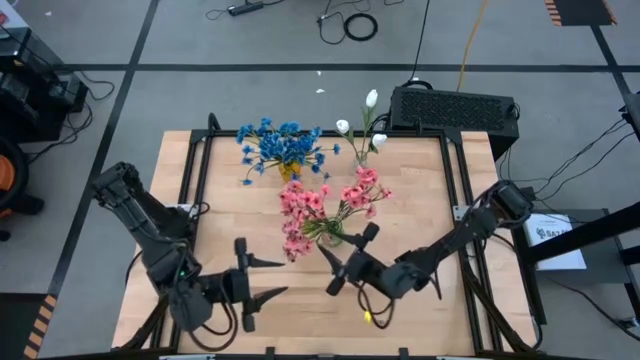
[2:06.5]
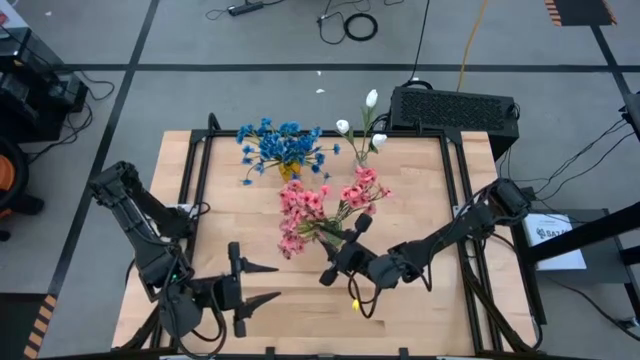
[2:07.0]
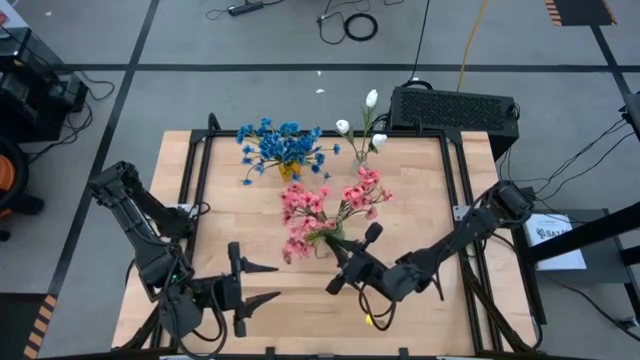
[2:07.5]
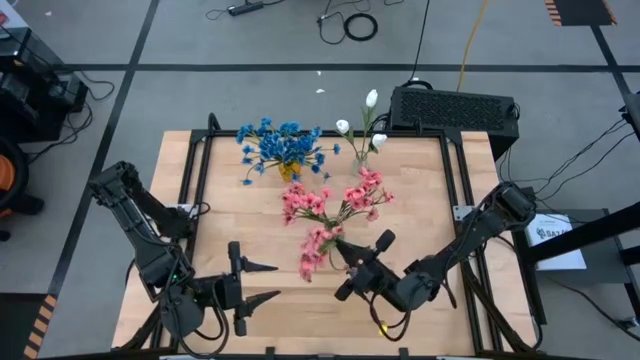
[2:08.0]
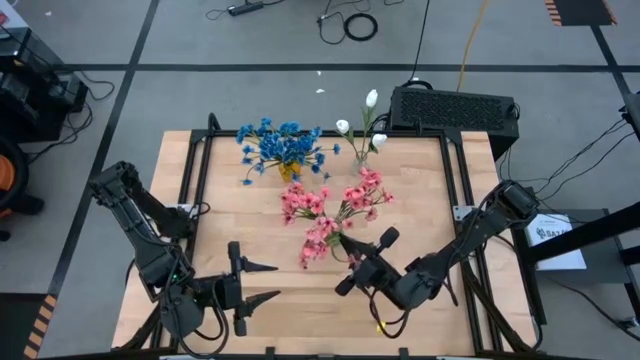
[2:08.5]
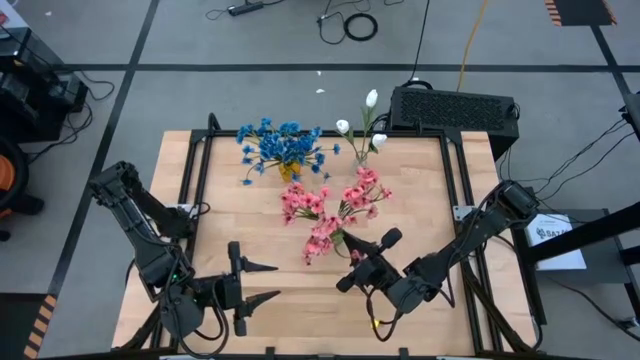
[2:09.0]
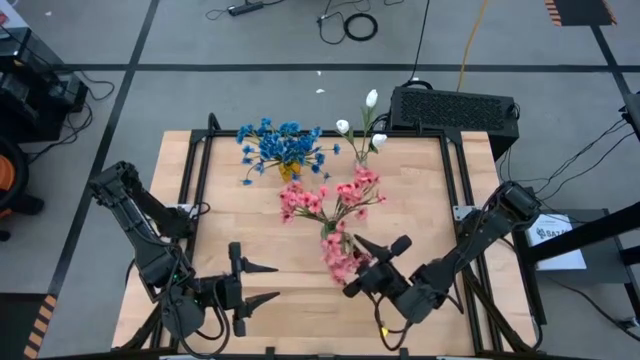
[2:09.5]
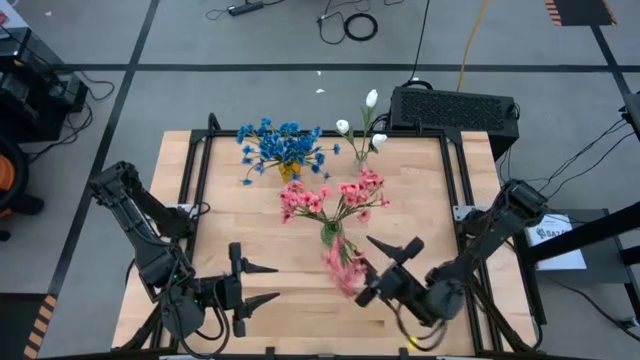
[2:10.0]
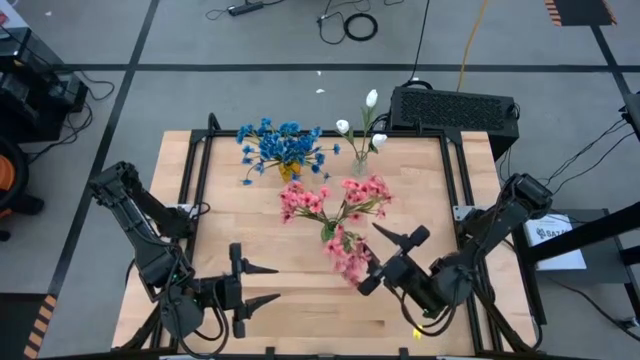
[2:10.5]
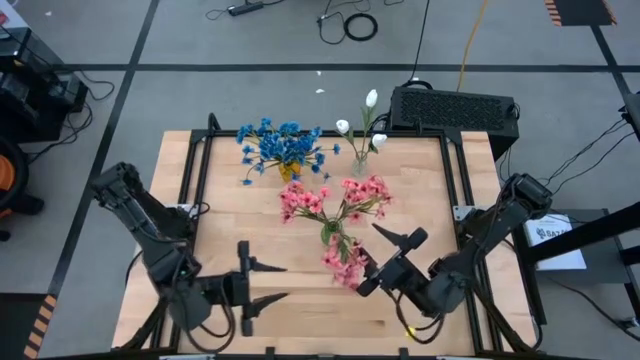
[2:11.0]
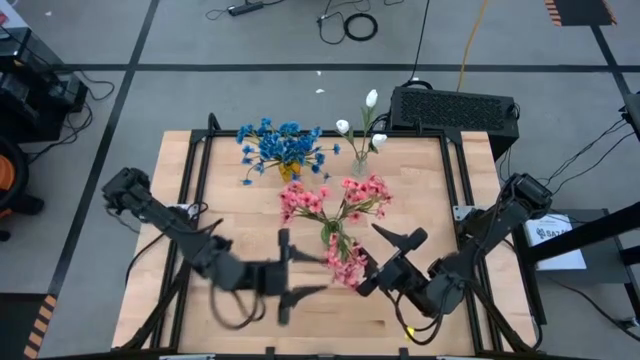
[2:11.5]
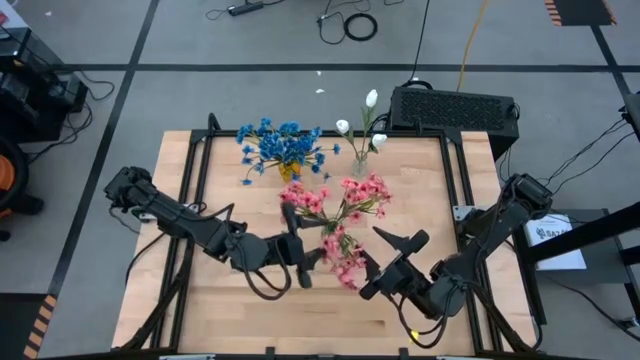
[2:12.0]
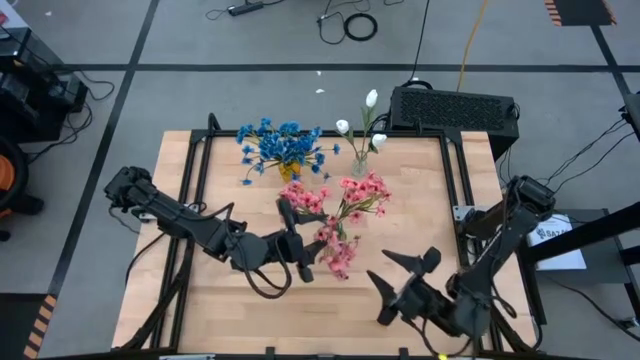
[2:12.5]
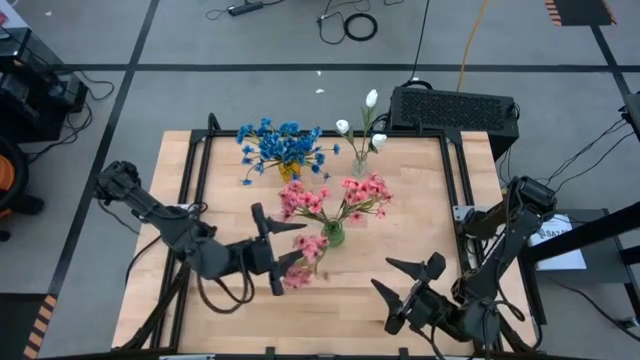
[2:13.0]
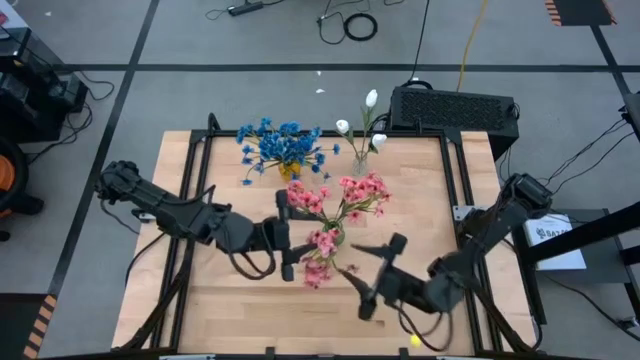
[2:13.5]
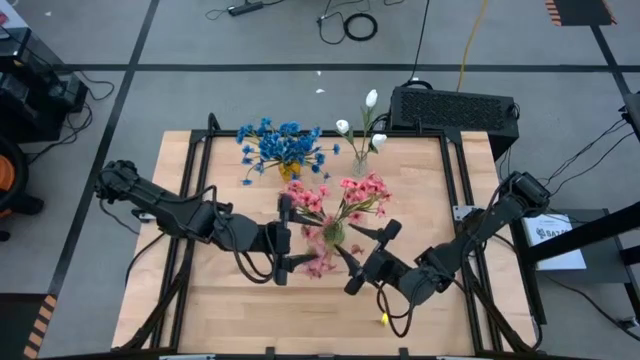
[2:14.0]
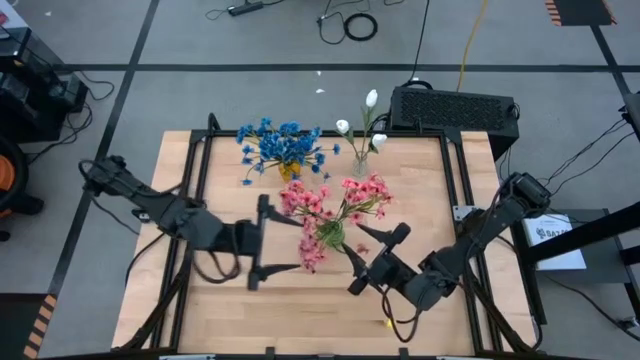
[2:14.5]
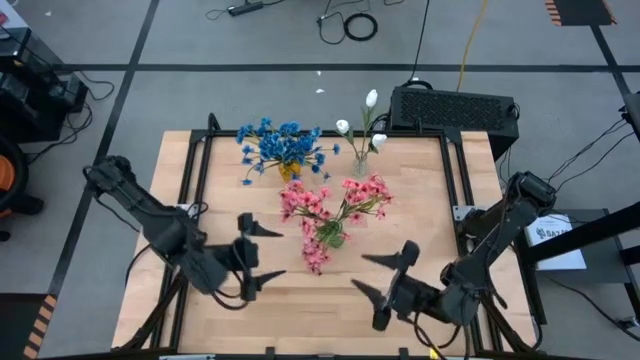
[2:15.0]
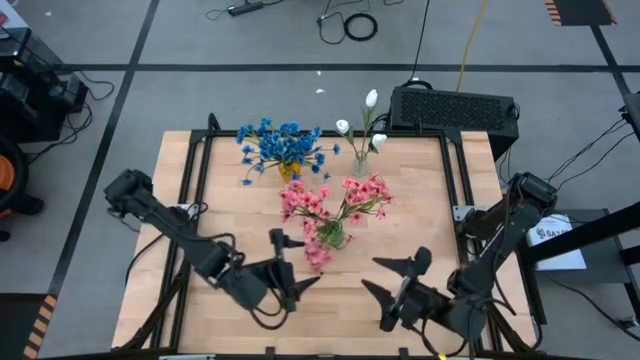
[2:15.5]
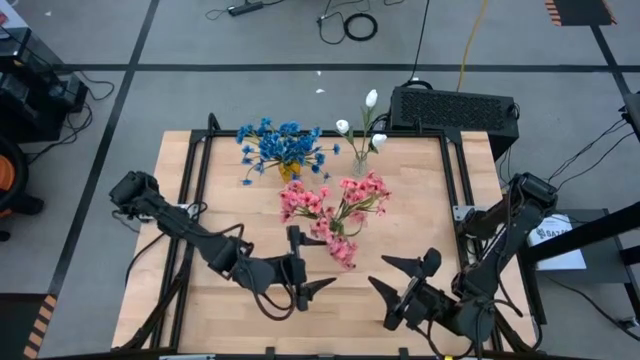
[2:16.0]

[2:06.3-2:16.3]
Task: Sort flowers into vase by color
Adjust the pink flowers in the green vase

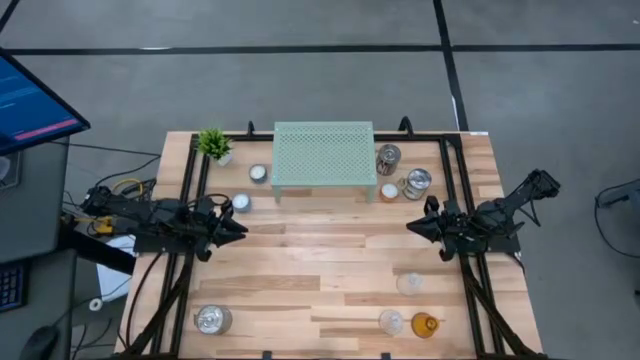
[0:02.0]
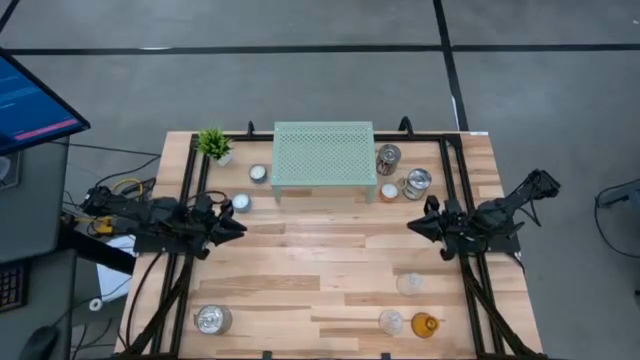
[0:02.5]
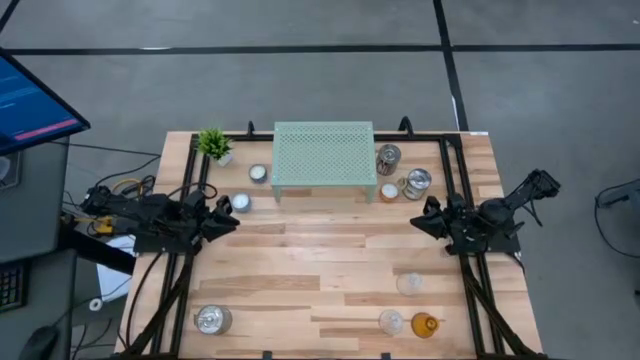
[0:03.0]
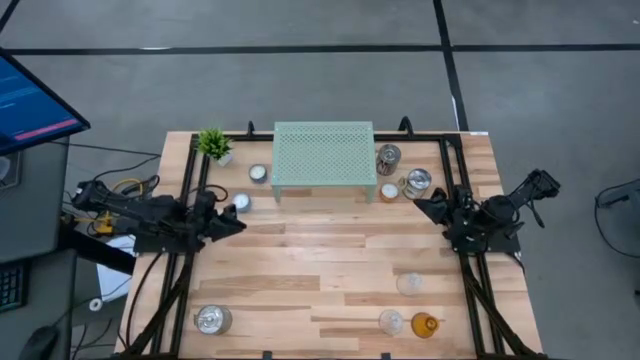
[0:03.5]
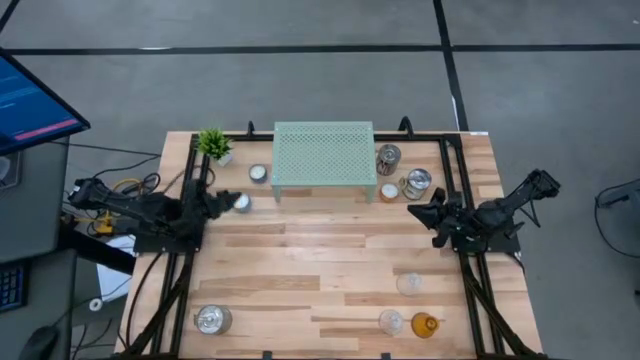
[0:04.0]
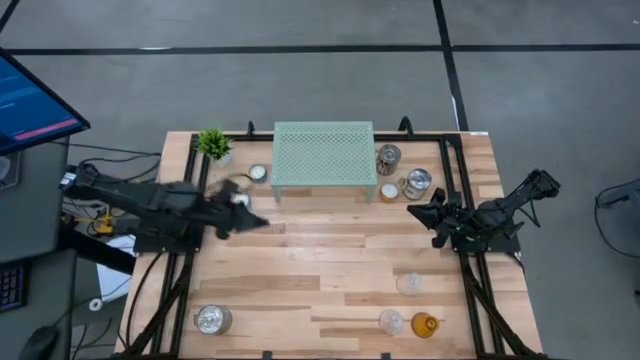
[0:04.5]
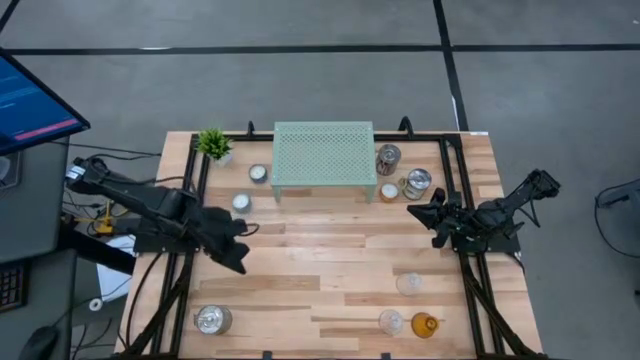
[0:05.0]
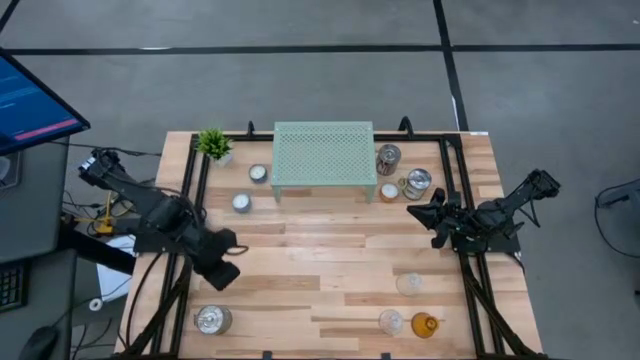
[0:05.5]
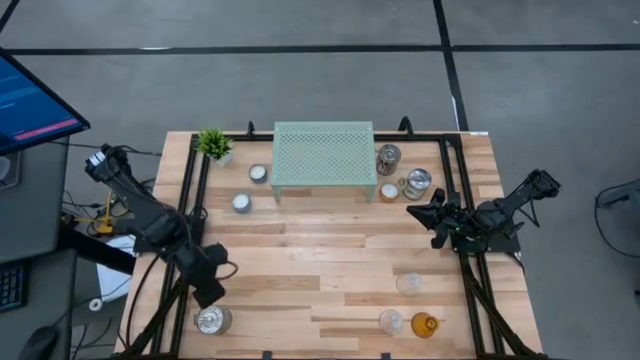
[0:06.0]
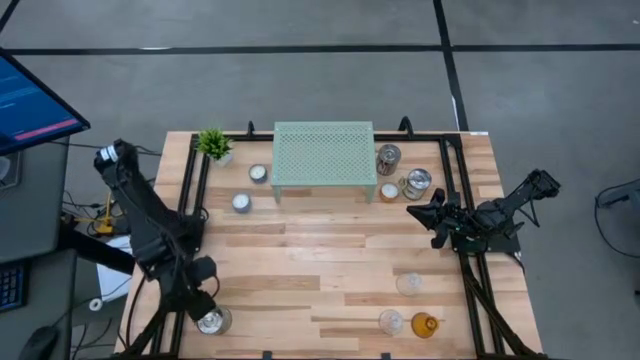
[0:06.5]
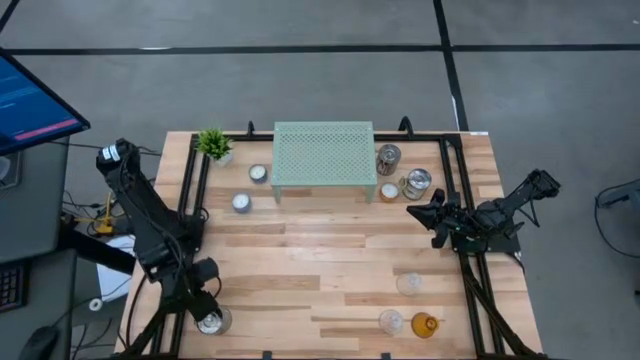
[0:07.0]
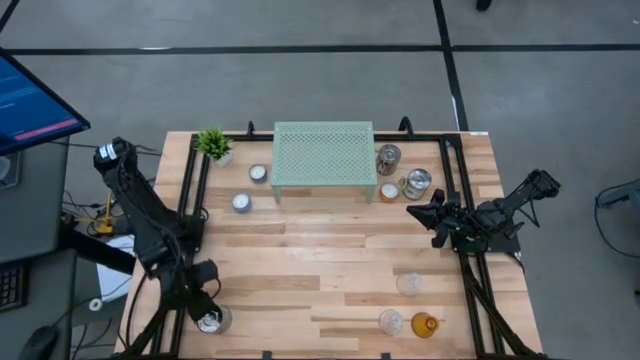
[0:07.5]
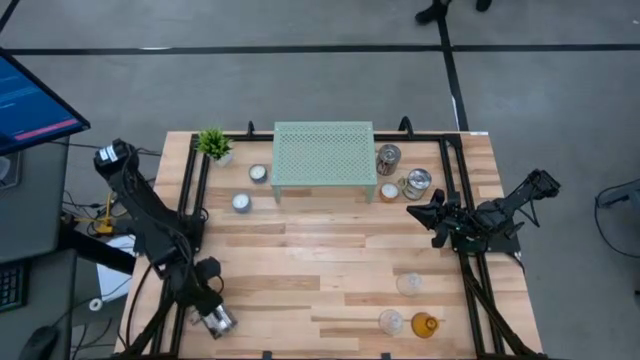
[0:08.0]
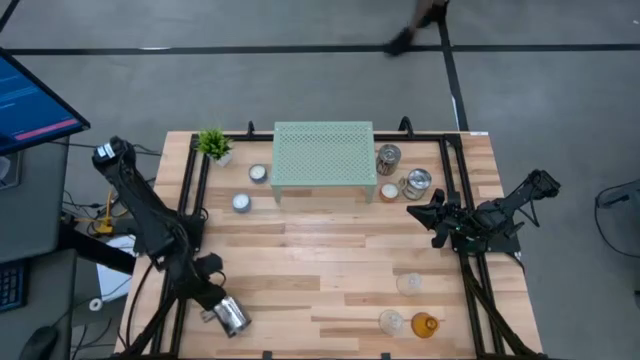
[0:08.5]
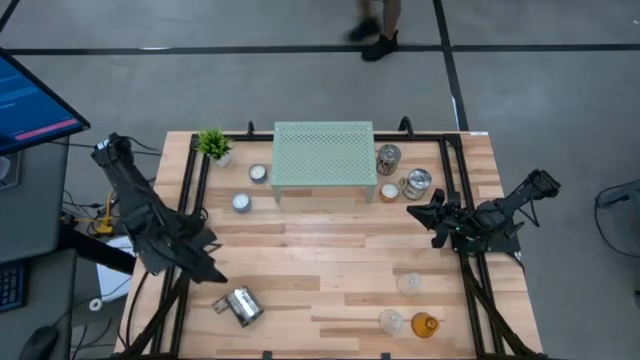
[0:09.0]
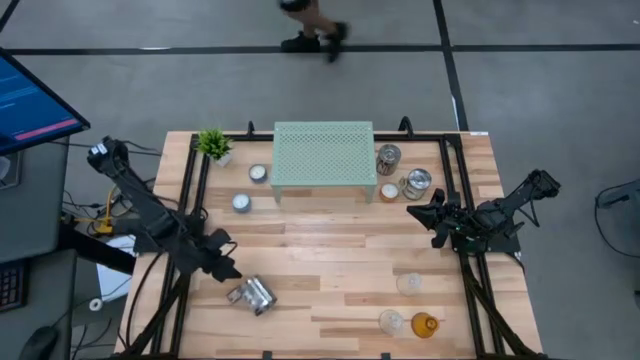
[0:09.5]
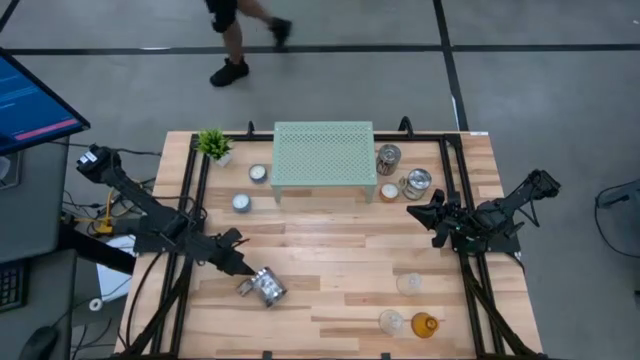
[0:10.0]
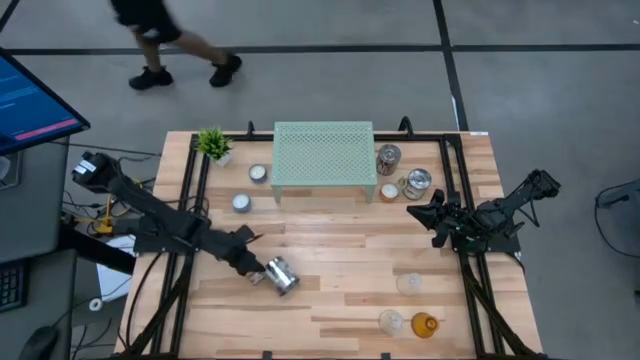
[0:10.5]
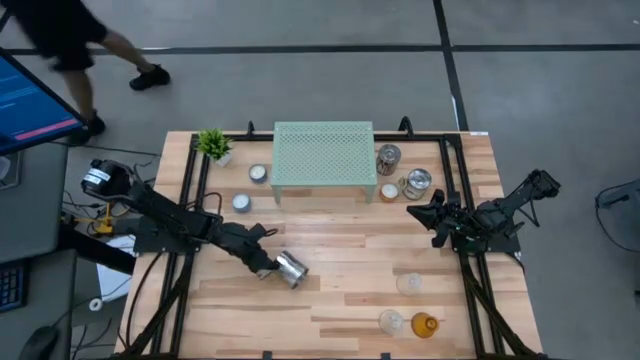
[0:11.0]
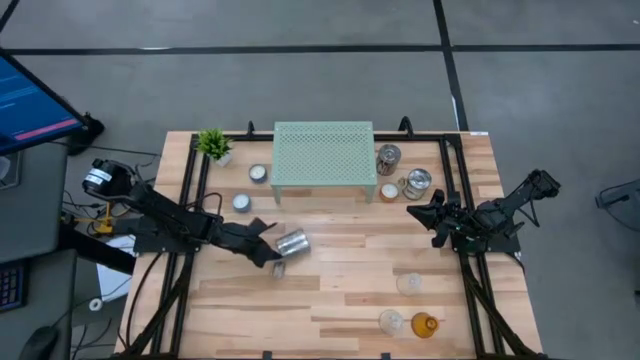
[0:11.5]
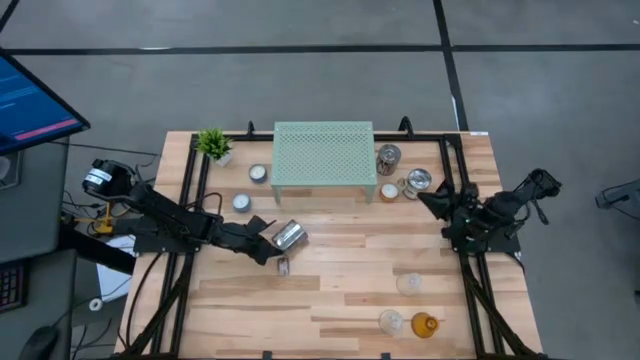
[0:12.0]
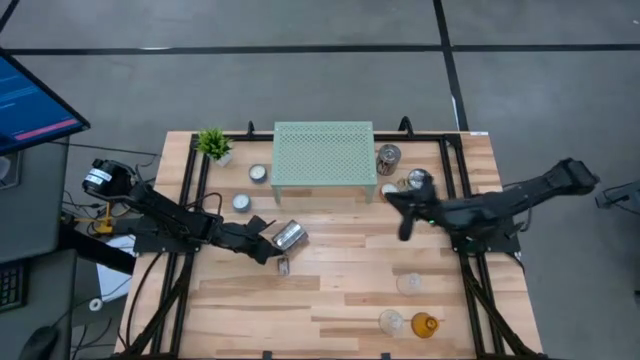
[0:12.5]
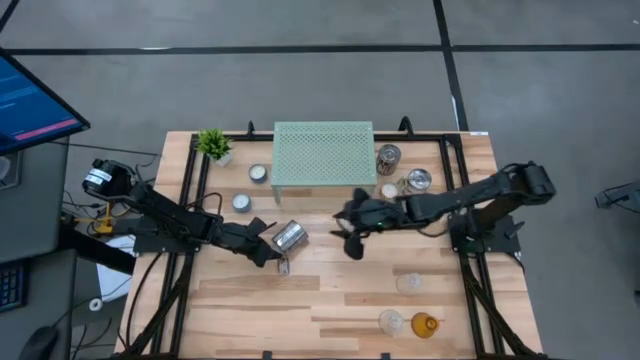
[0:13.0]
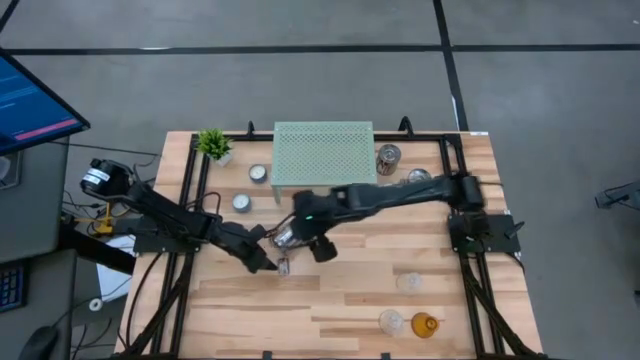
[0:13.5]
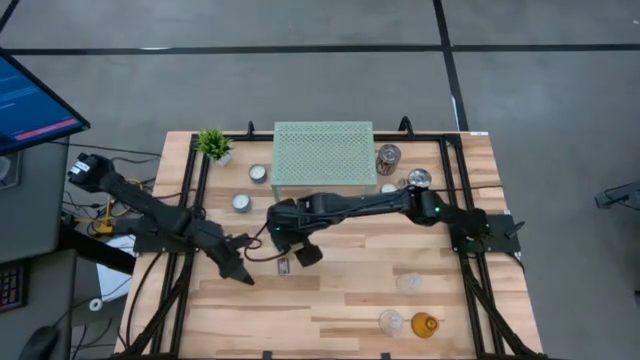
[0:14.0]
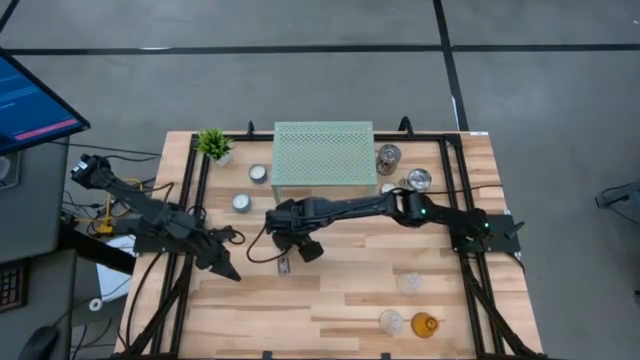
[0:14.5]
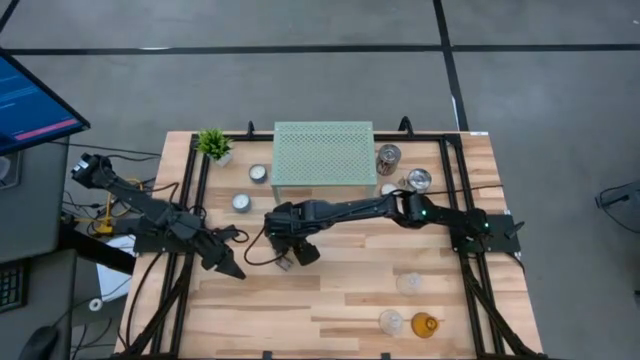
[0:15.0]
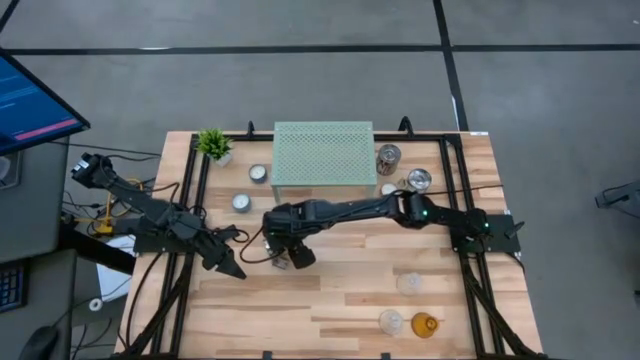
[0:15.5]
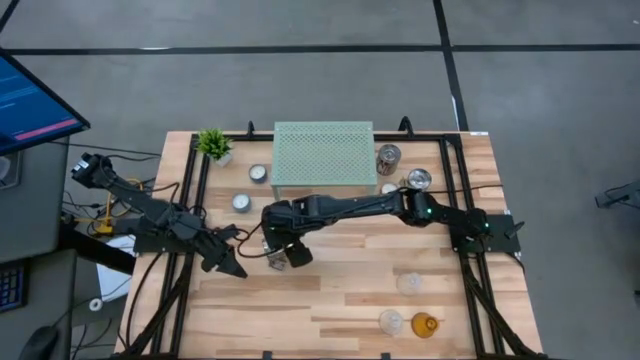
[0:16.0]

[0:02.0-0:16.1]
Task: Pick & Place candle stick holders
Put the bottom silver scented candle on the shelf
